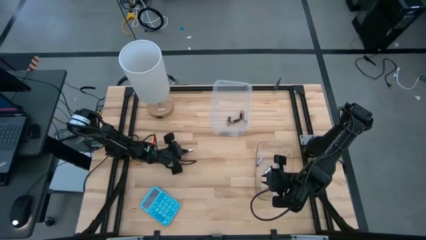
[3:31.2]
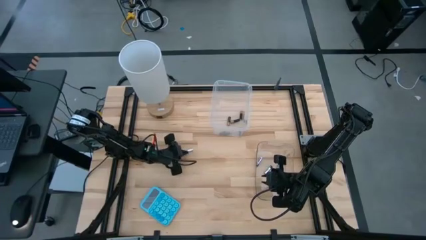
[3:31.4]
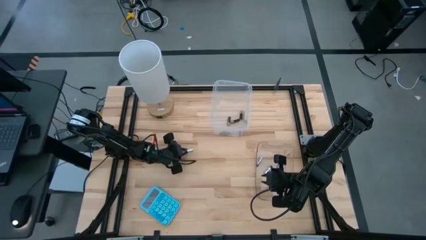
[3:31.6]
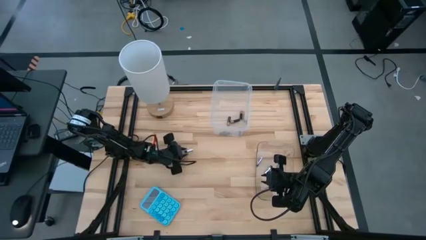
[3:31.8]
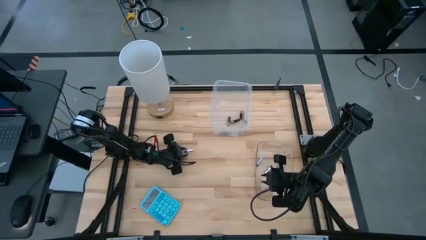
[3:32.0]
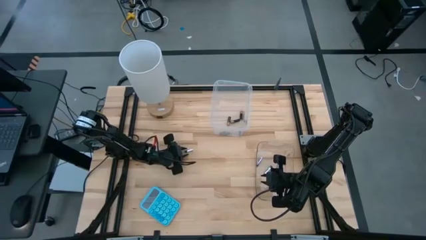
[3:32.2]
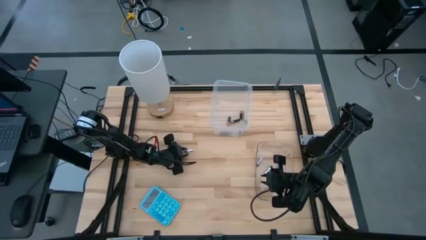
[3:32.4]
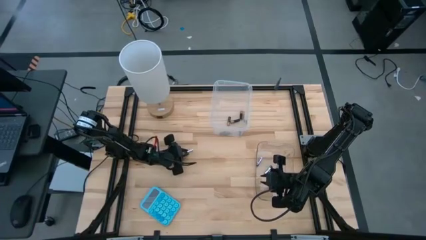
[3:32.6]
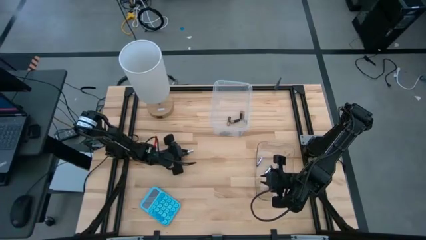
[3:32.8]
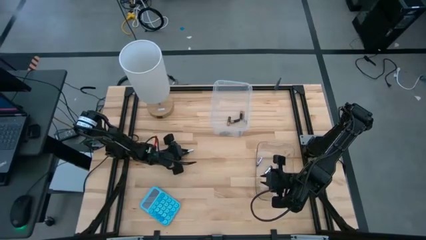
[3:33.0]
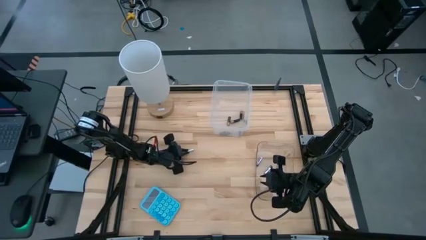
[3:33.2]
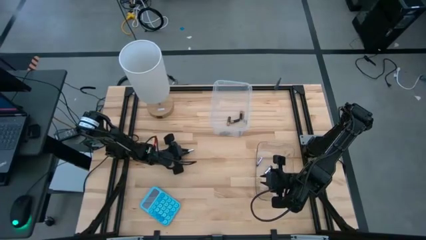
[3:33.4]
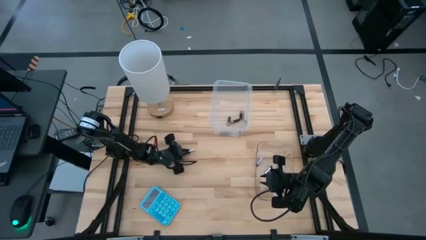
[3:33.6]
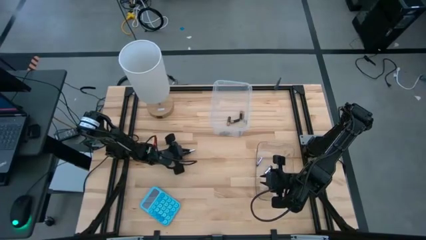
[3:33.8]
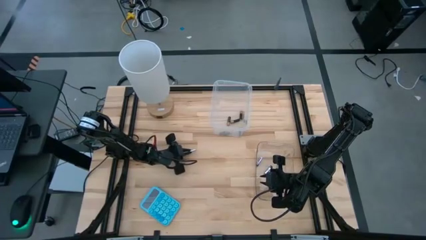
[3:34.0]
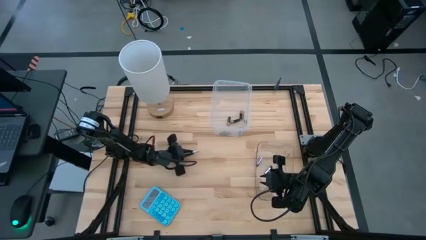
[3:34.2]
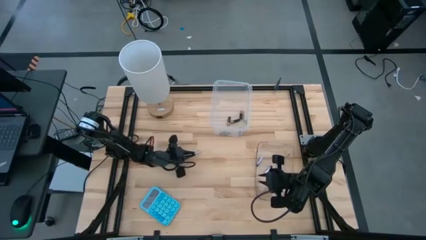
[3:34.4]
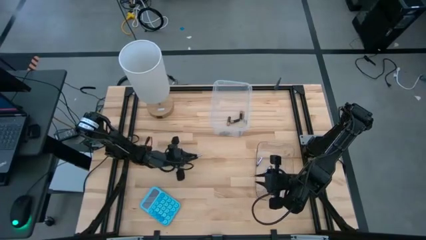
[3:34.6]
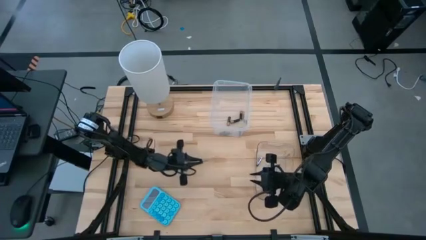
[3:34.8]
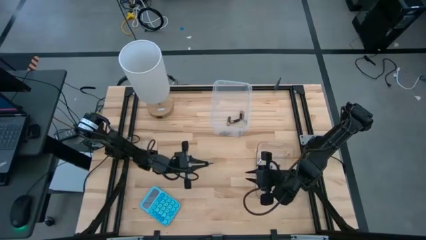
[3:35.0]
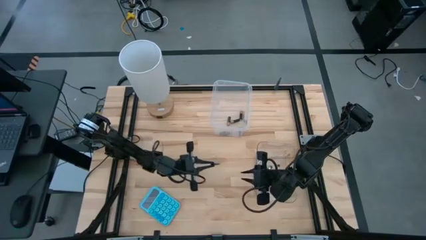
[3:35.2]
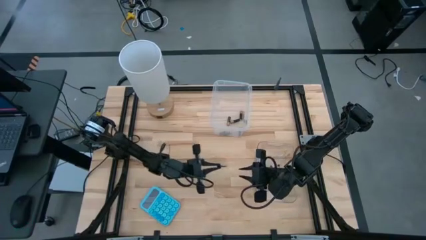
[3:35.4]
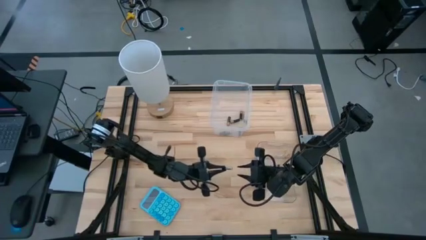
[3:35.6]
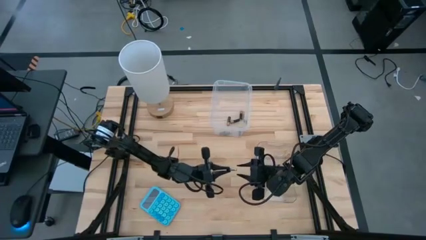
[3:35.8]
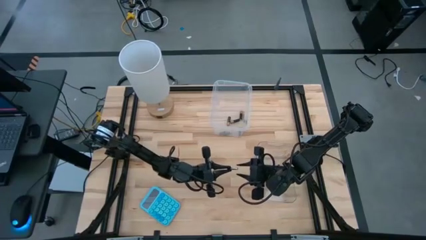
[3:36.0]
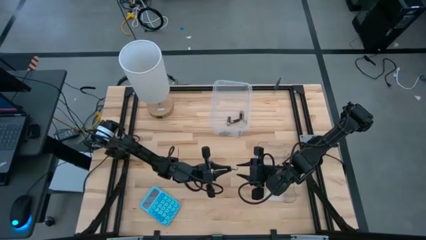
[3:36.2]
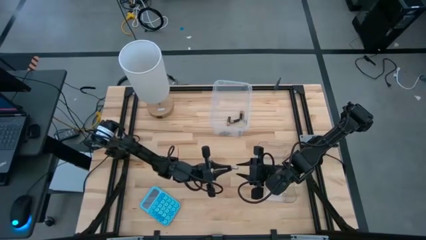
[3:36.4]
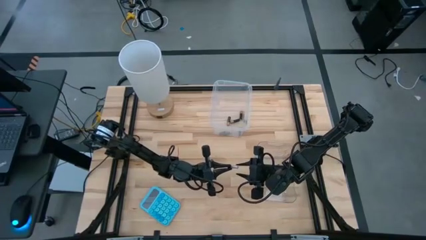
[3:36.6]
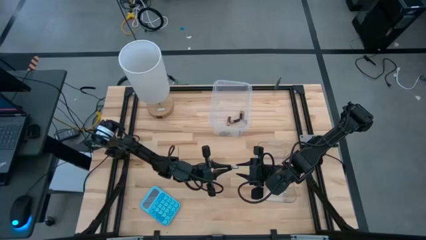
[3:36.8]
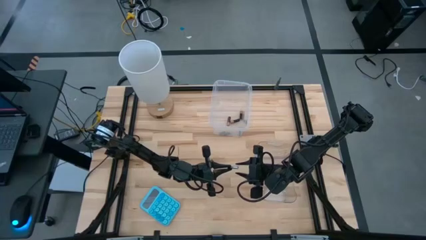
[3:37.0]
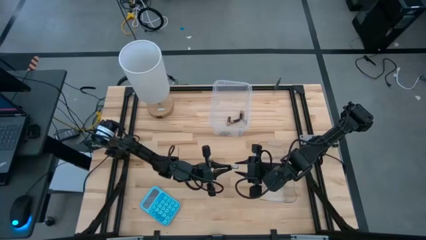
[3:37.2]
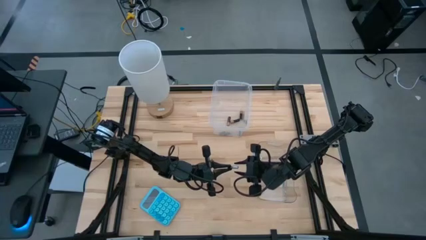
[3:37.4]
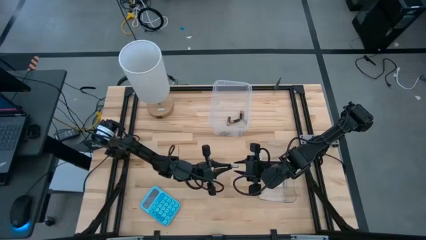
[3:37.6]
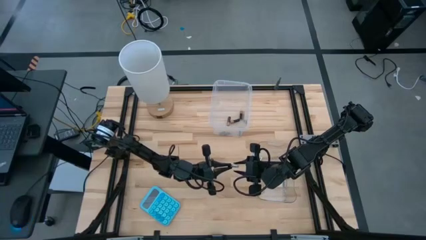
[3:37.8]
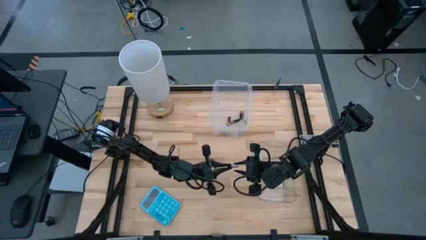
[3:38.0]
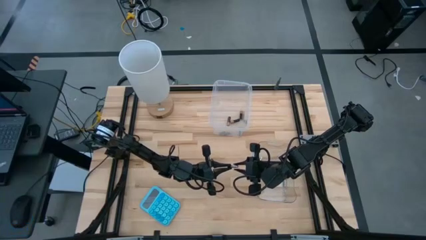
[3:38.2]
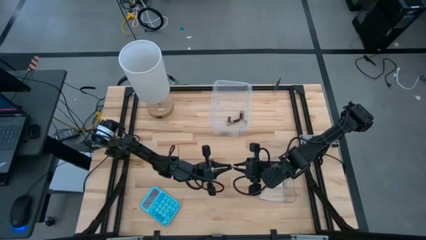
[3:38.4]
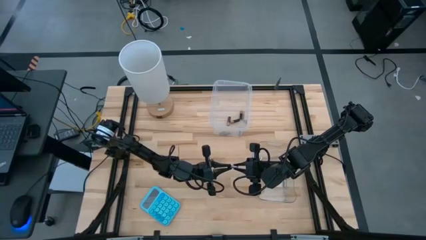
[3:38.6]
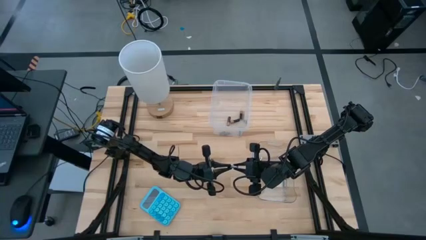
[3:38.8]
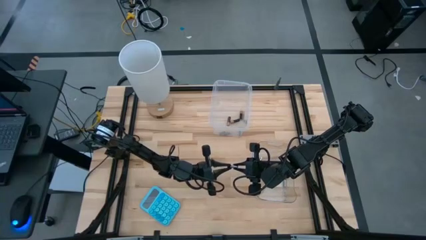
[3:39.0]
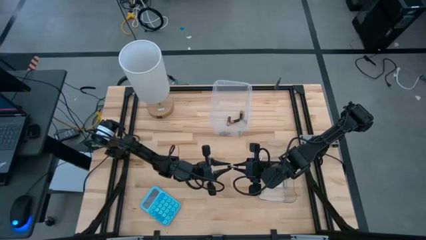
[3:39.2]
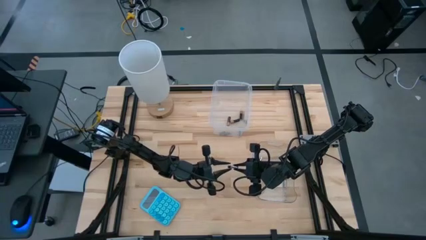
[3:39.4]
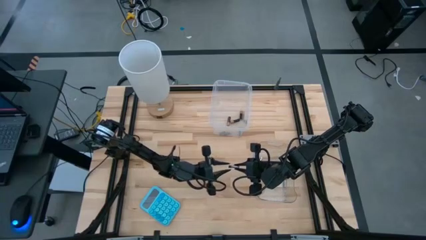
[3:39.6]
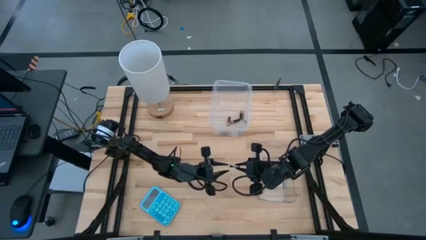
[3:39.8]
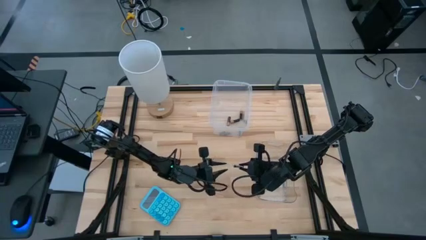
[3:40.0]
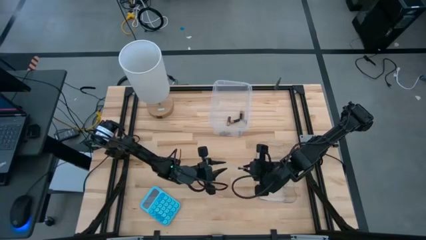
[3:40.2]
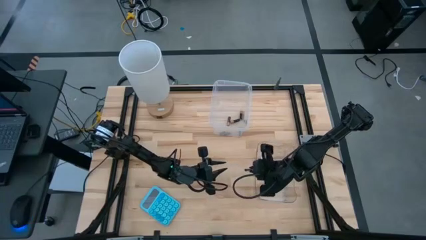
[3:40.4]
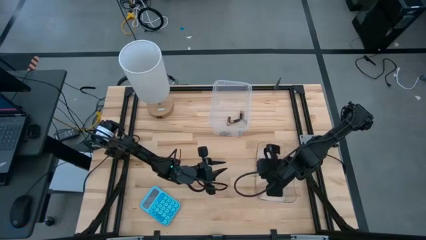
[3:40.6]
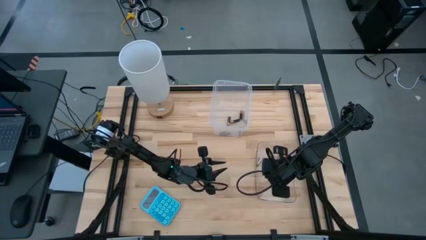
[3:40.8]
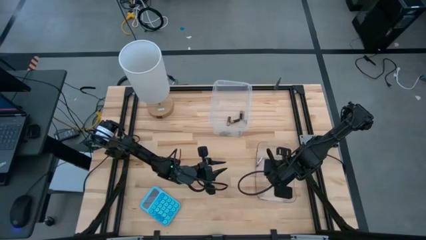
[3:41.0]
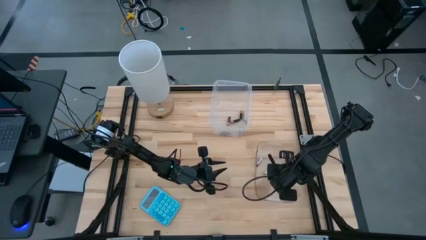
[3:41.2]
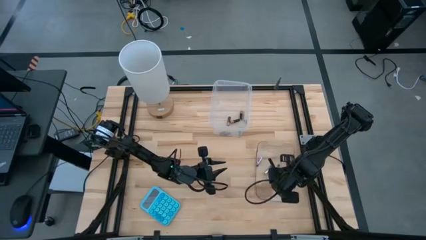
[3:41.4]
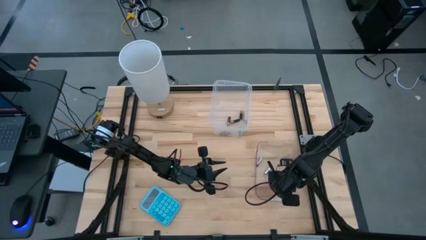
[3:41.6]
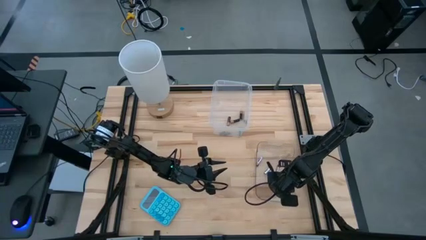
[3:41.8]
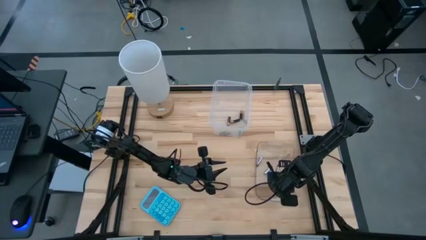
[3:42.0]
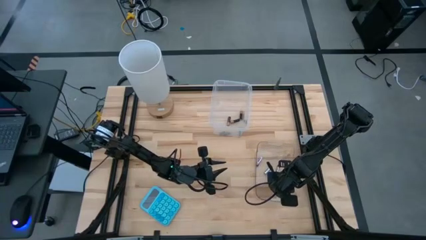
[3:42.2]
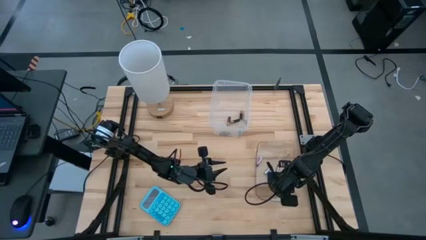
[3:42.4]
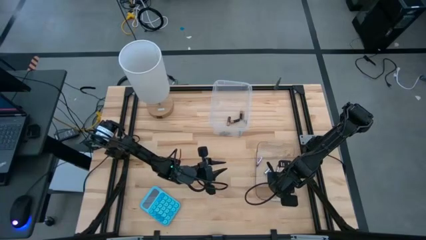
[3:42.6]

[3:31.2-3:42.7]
Task: Sort batteries
Put the silver battery into the bottom transparent bin

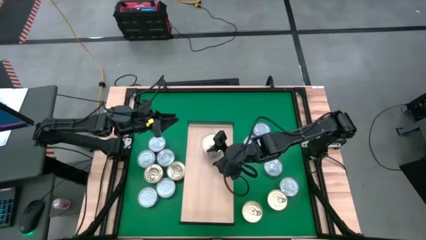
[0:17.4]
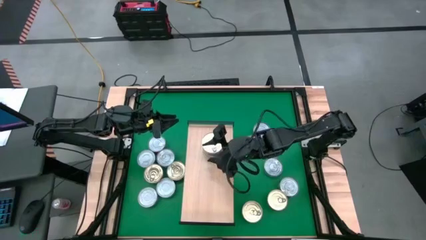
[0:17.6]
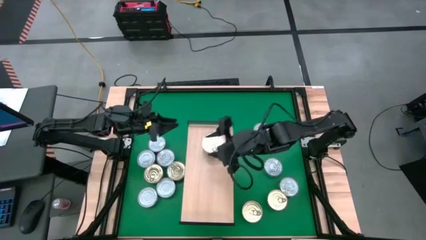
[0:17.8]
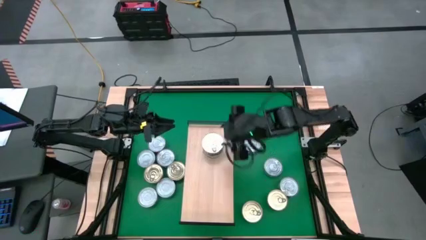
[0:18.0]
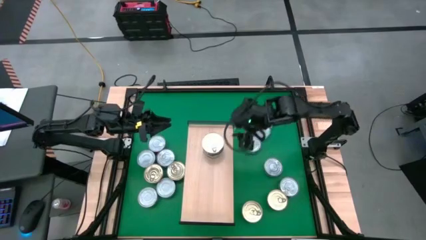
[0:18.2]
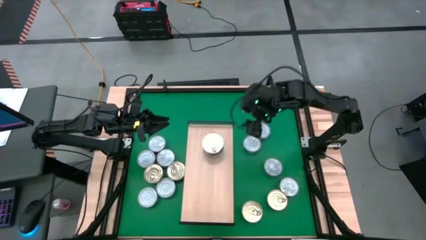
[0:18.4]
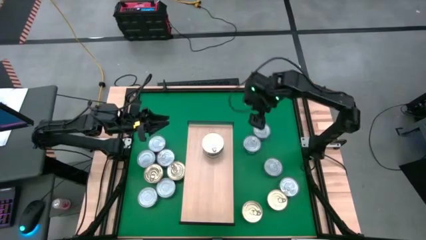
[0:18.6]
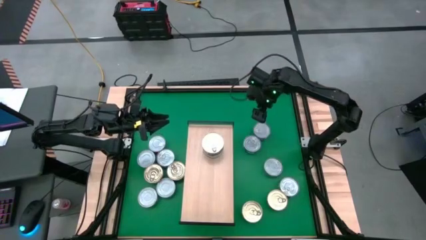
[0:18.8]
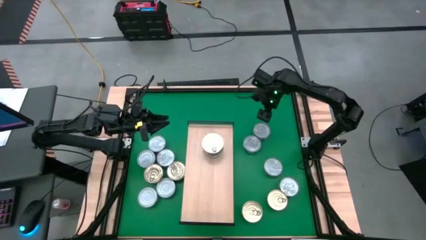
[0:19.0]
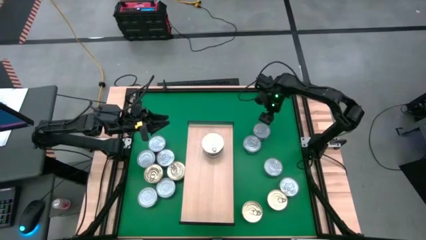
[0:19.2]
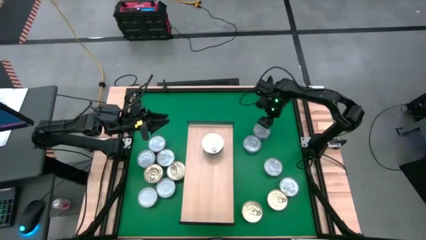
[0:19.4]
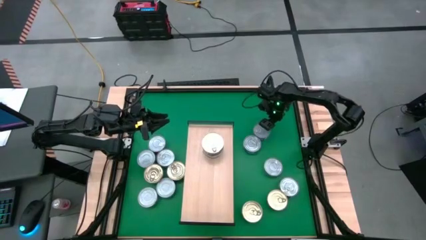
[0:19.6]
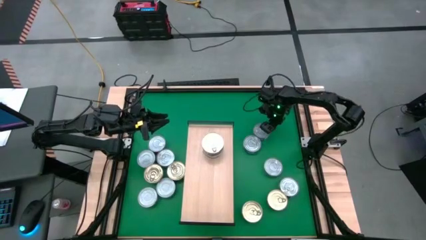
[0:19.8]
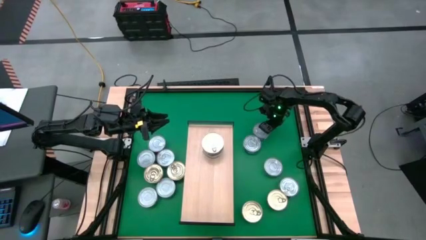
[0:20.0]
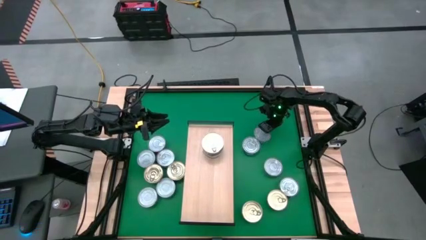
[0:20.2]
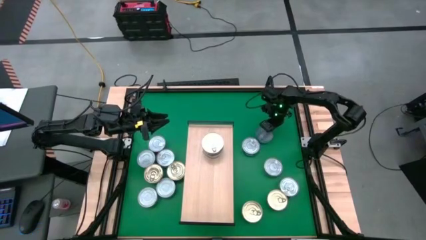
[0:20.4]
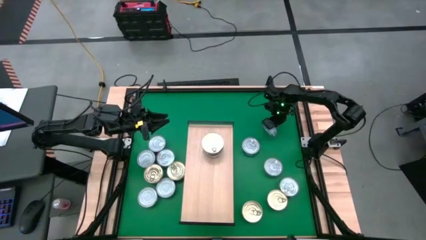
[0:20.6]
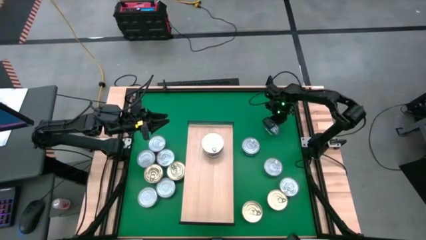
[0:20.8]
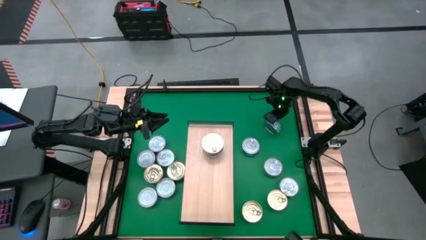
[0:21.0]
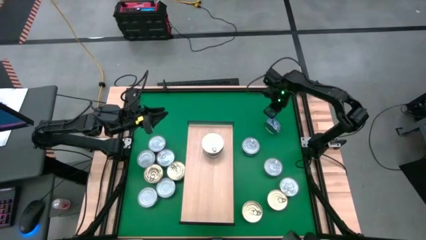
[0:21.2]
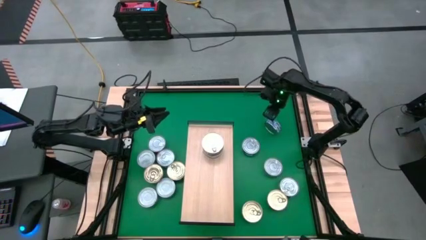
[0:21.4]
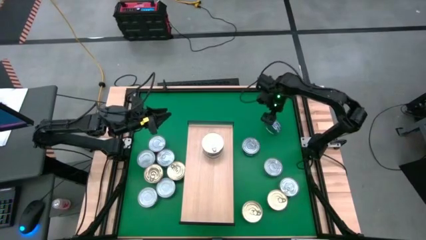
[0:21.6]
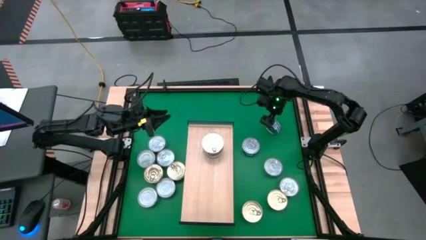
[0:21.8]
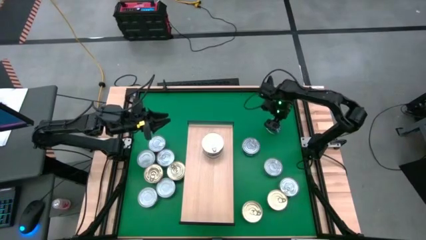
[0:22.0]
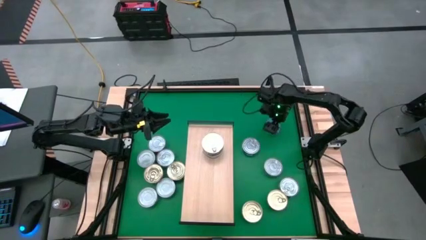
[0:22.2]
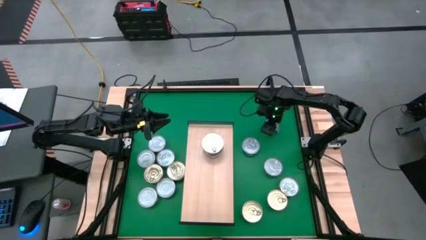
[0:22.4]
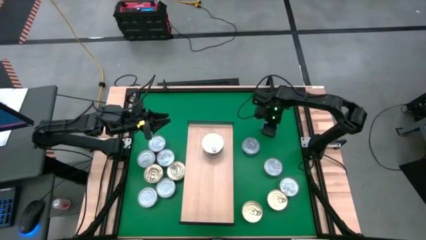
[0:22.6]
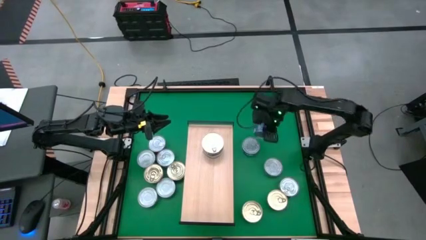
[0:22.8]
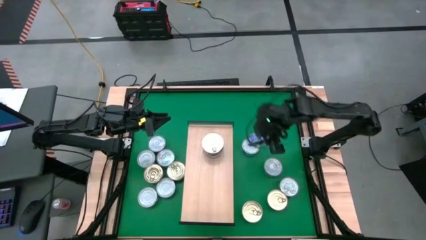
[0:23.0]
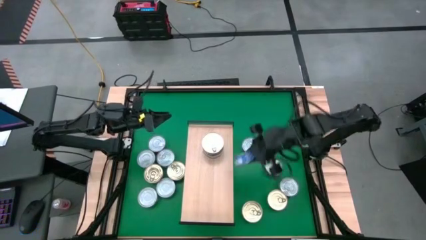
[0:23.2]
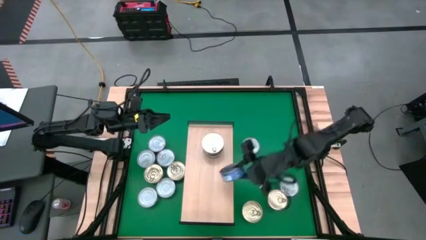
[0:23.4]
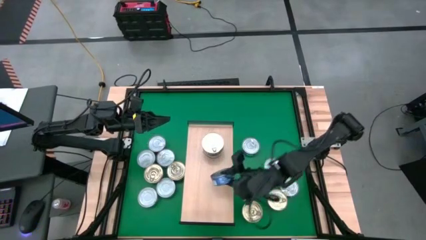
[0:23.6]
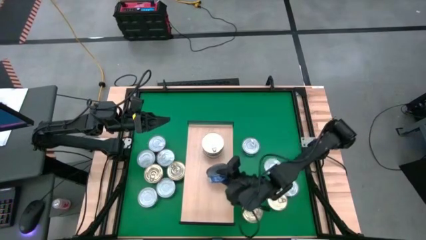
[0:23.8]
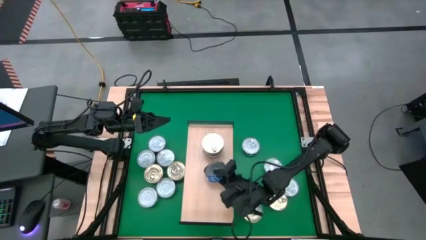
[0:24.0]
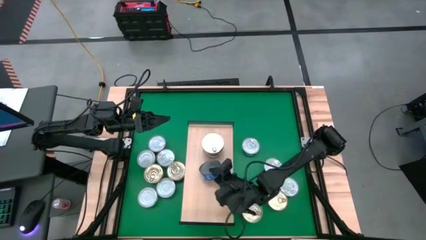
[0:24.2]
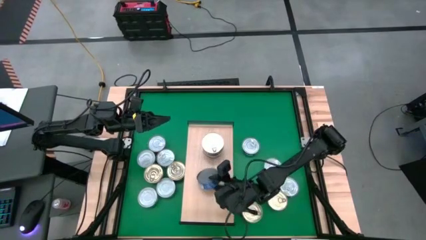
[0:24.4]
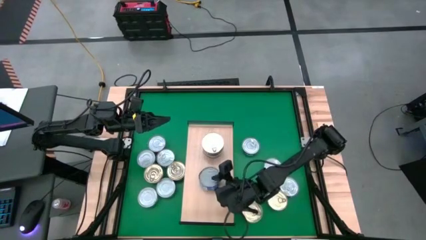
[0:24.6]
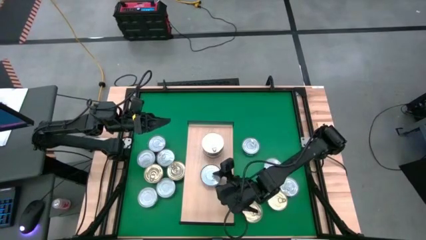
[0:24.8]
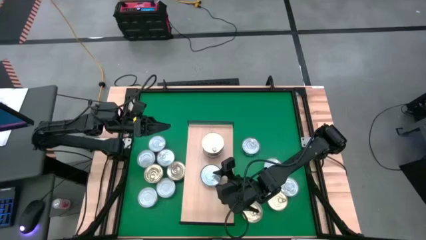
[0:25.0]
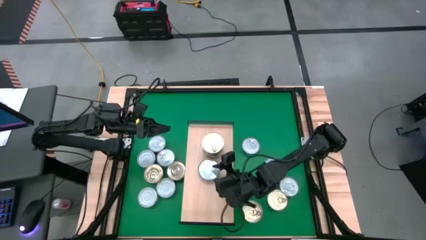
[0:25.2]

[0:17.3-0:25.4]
Task: Stack canned seafood by type on shelf
Put the blue tuna can on the shelf
